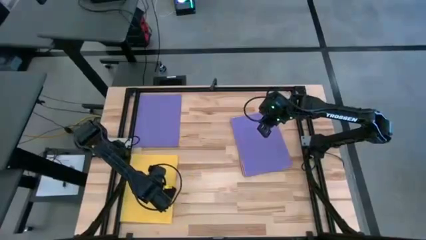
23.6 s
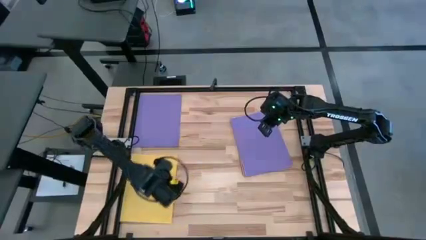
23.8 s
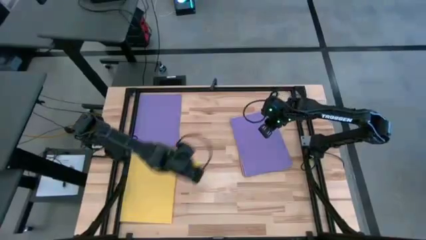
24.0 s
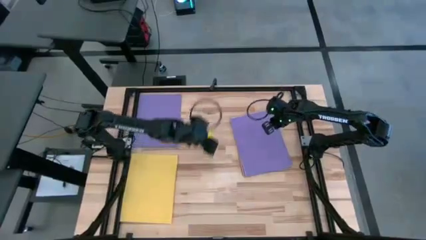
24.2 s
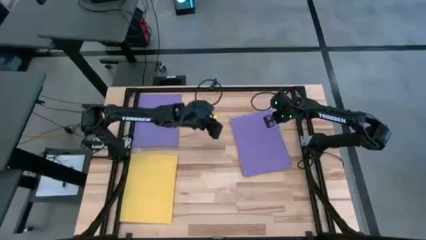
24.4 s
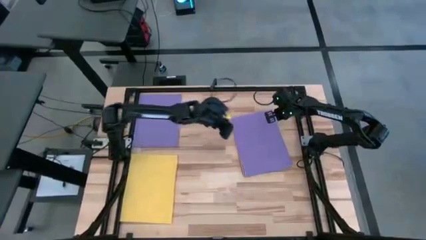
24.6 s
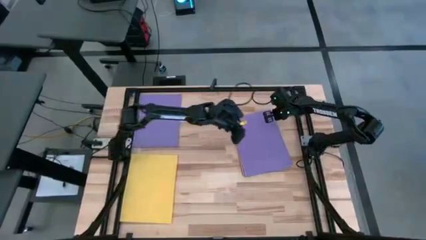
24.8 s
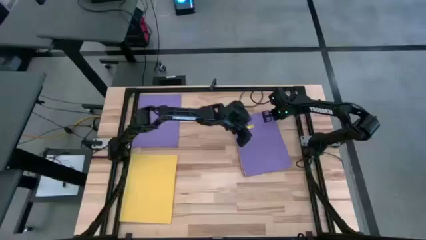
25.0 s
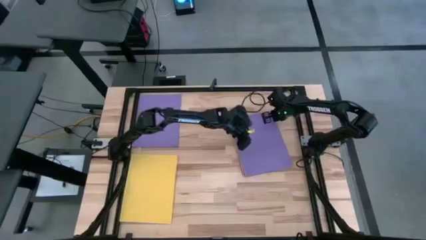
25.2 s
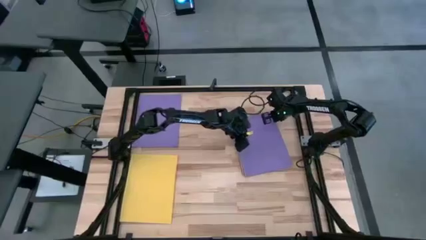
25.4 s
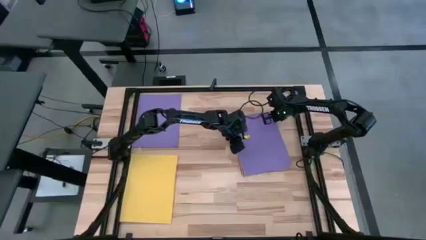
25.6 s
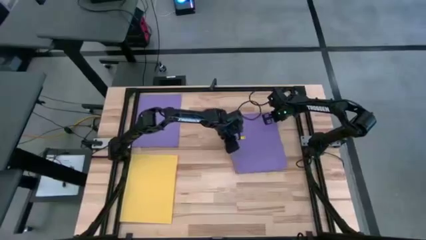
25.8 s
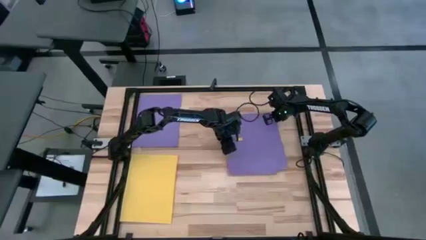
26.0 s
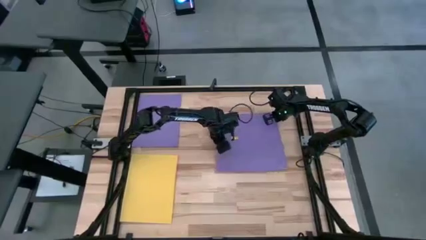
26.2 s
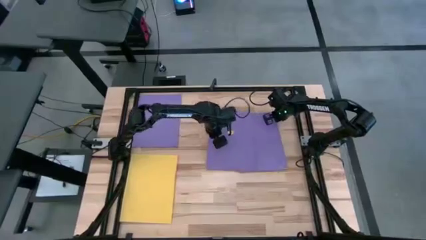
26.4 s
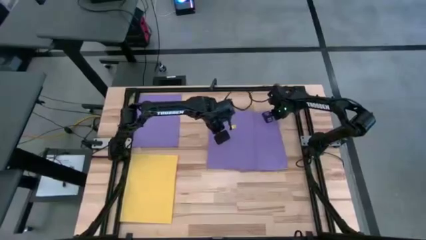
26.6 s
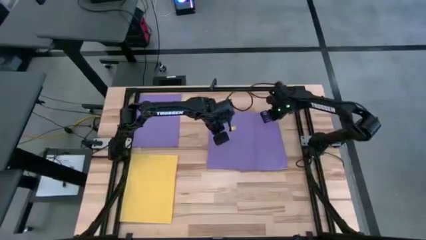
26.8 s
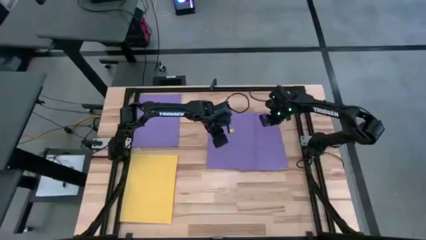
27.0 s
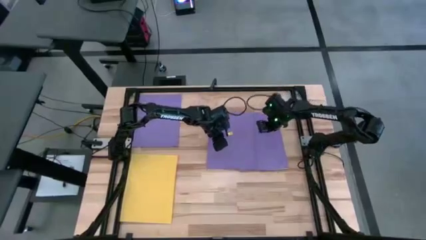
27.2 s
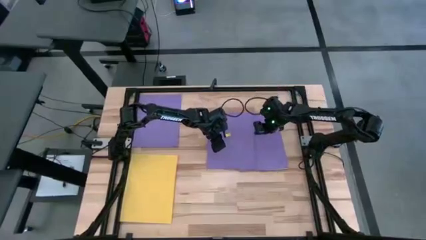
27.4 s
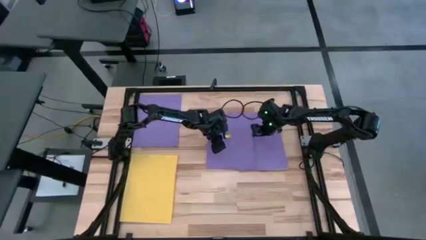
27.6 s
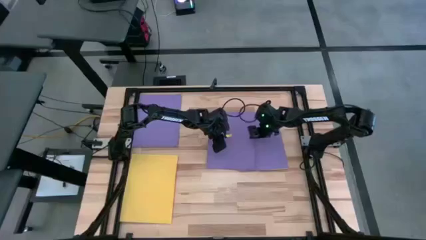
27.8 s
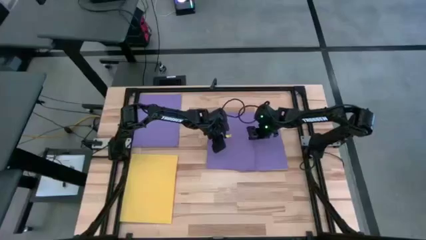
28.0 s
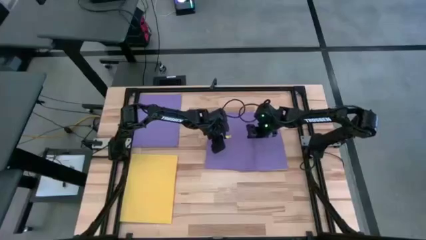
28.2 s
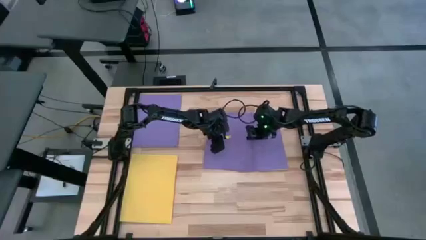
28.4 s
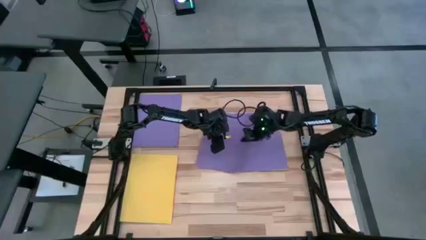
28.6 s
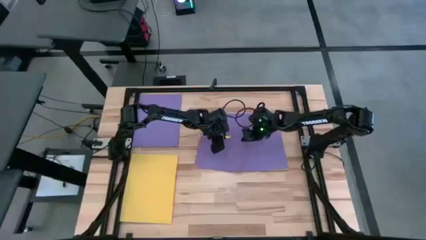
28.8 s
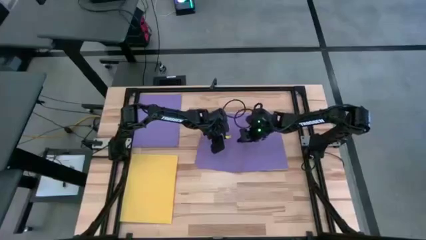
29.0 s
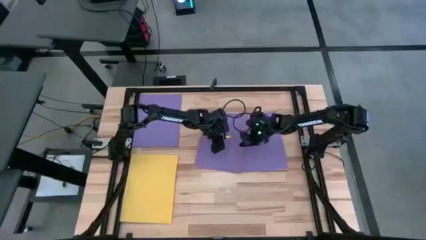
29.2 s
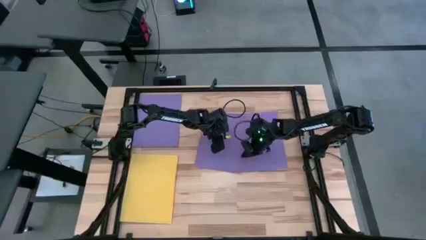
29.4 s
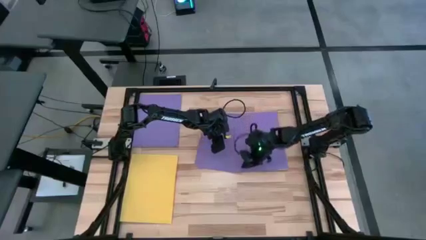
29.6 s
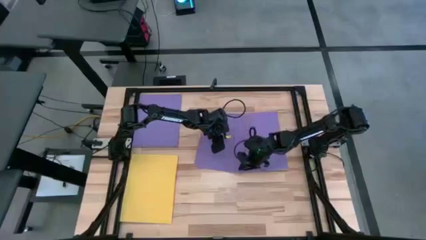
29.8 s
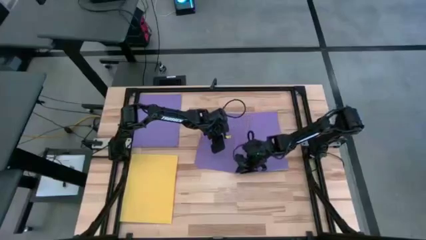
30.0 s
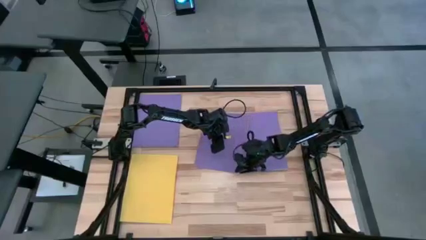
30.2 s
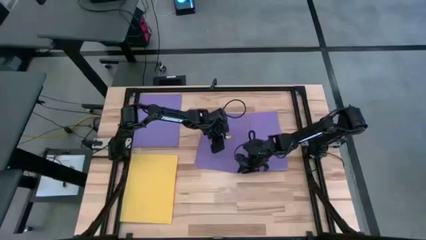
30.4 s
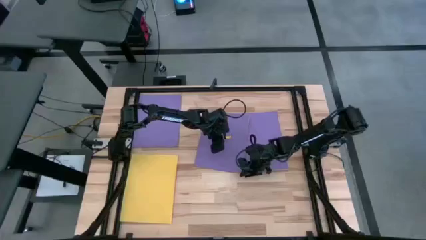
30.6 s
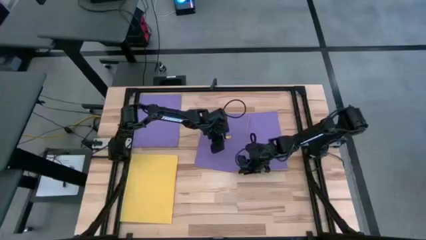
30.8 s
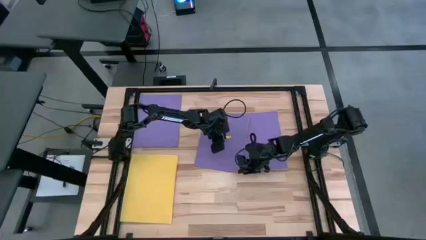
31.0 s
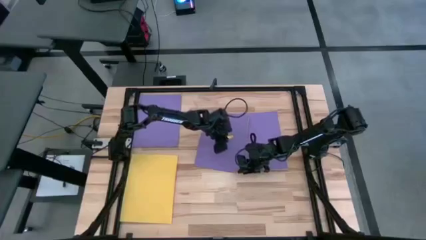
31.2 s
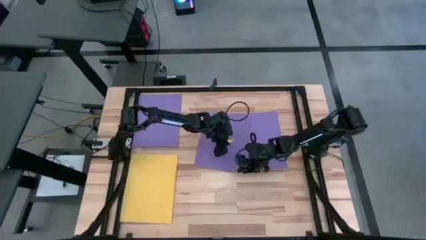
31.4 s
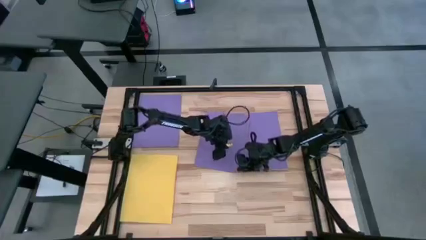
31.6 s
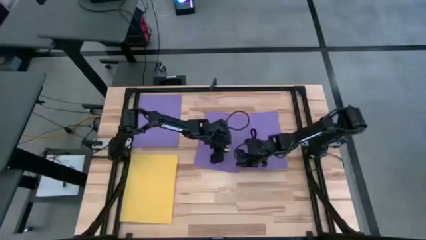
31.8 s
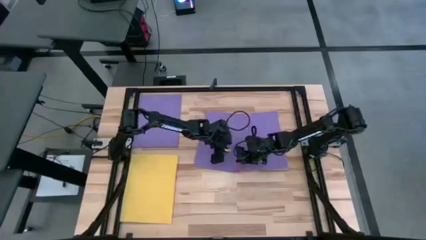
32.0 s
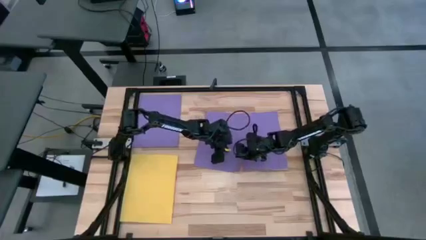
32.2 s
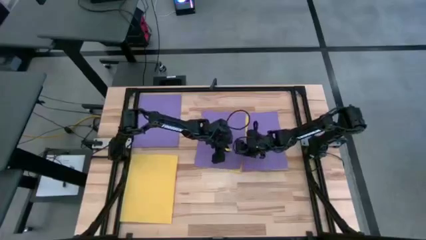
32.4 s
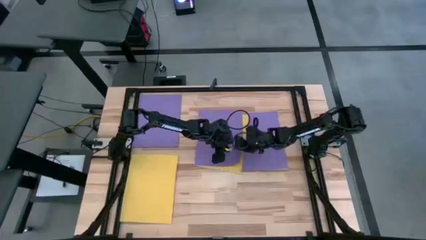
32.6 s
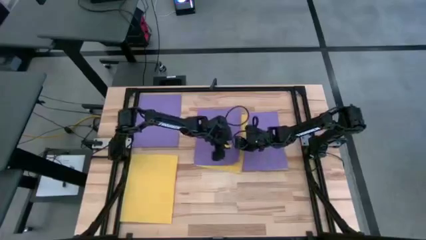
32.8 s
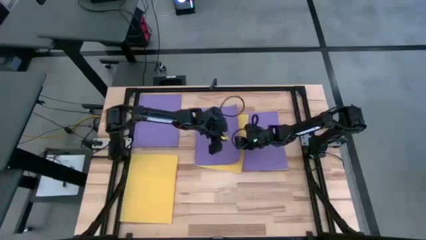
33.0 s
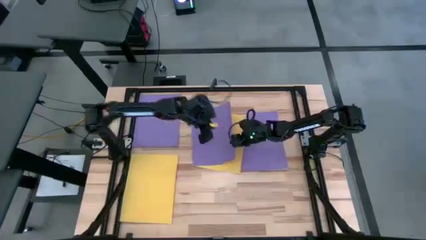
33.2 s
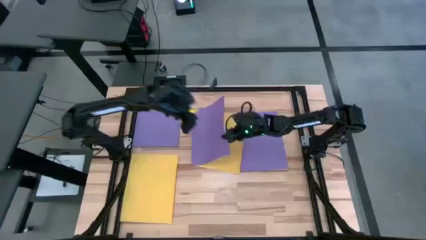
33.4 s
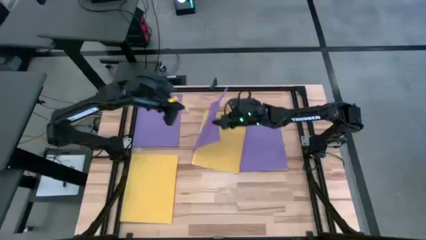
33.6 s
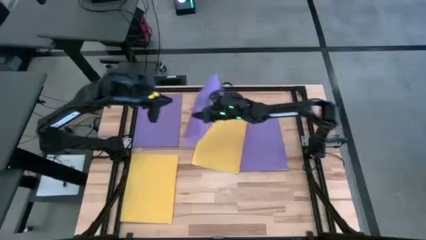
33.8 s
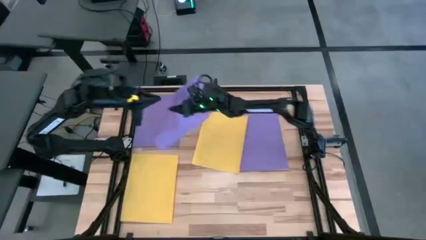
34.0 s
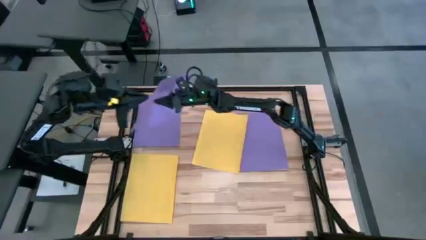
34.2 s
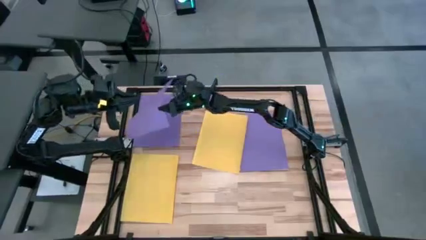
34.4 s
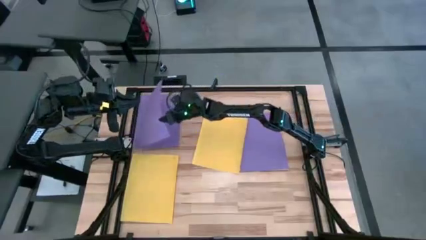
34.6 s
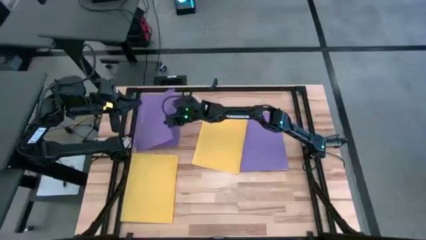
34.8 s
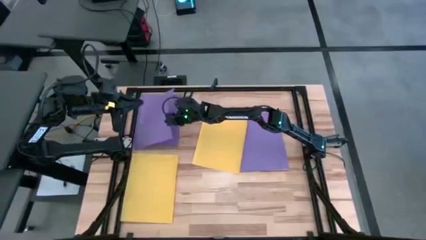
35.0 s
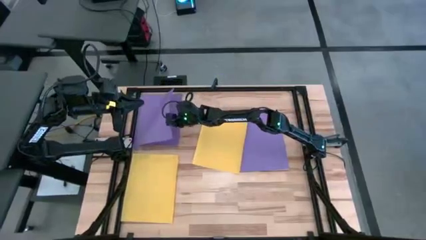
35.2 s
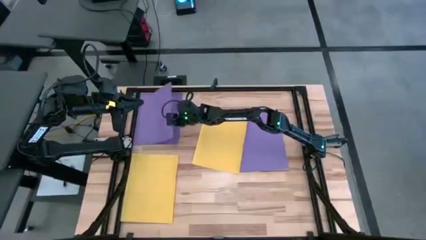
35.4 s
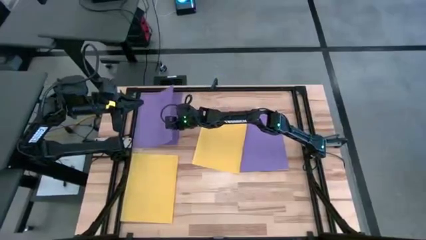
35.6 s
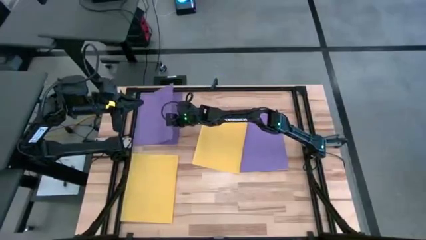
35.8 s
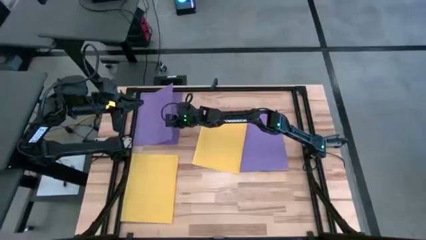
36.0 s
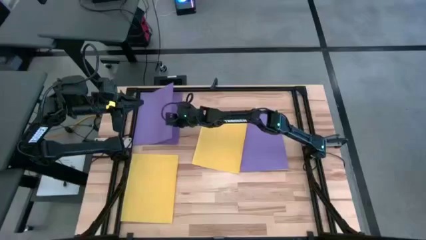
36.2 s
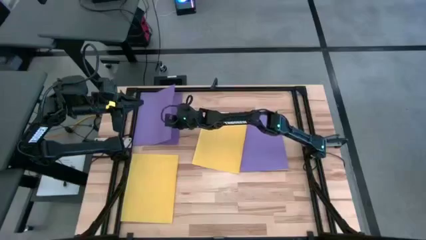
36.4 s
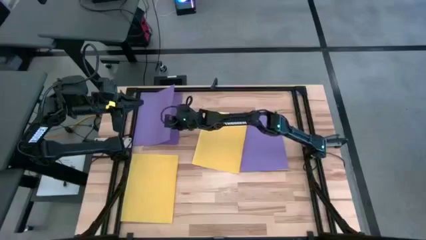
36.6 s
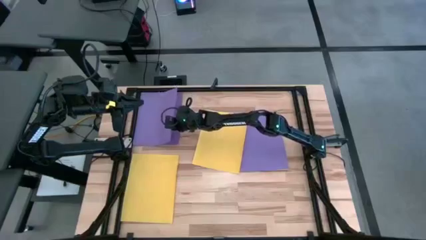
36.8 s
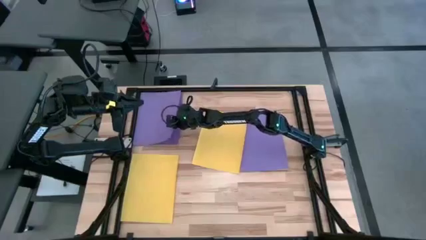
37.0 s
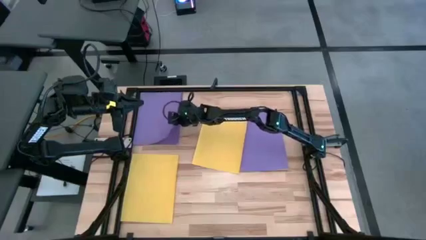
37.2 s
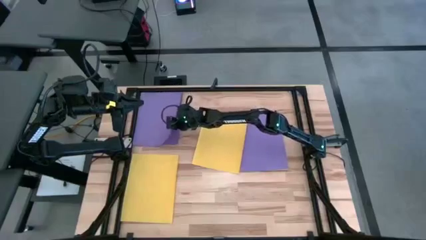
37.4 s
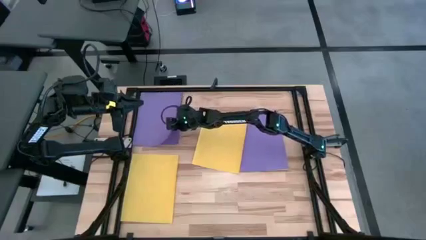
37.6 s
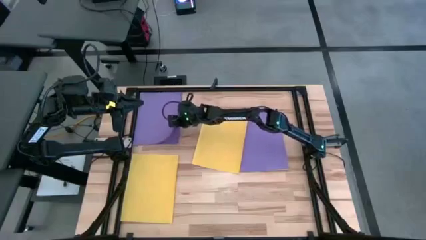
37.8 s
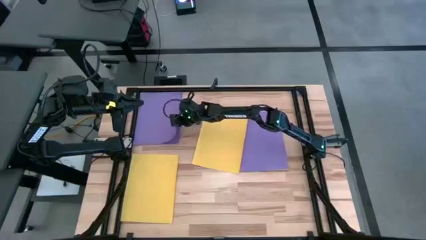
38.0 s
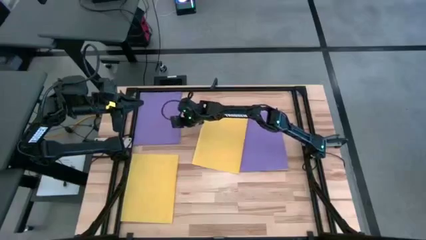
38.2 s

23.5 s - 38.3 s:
Task: Organize paper
Stack the purple paper on top of the other purple paper

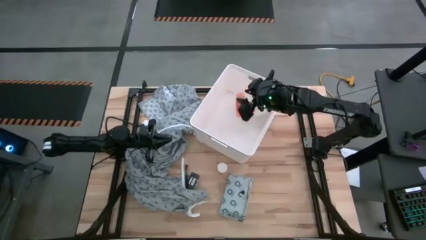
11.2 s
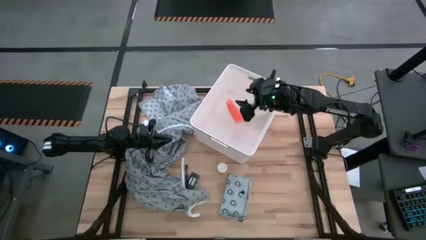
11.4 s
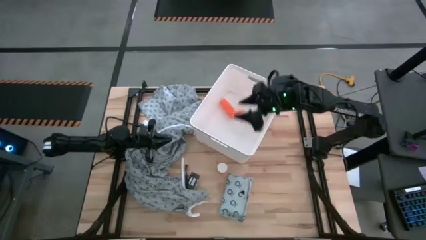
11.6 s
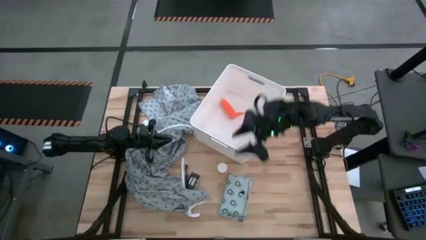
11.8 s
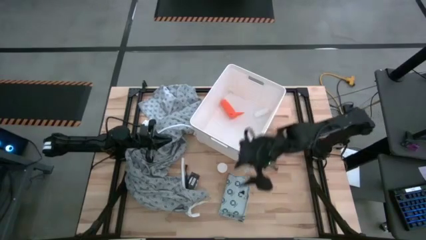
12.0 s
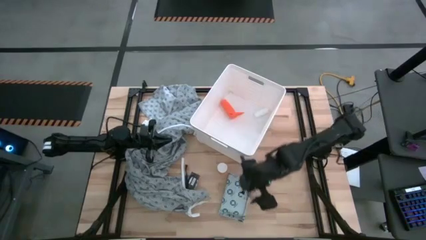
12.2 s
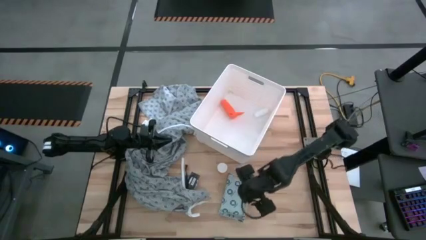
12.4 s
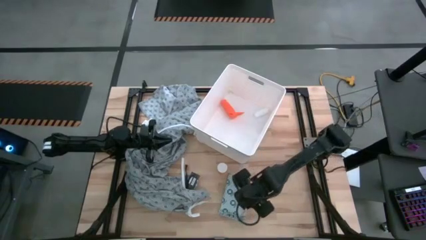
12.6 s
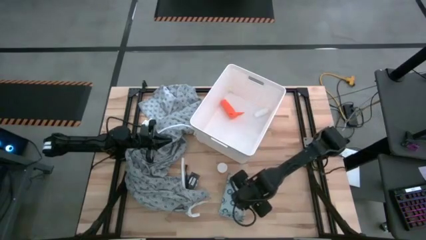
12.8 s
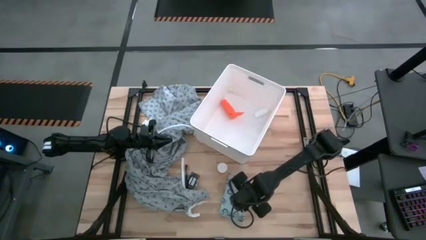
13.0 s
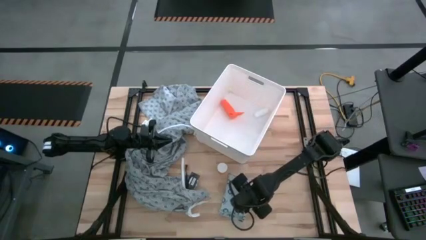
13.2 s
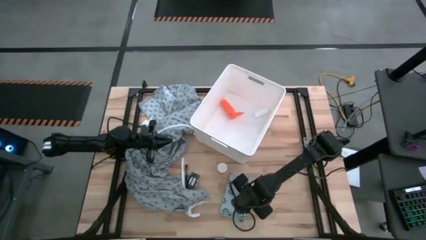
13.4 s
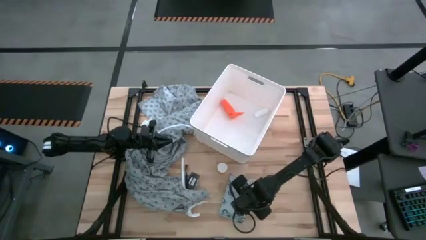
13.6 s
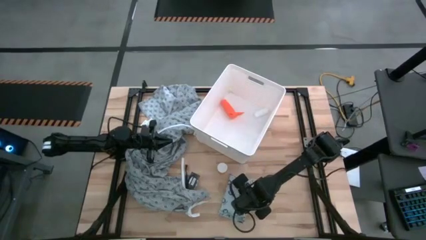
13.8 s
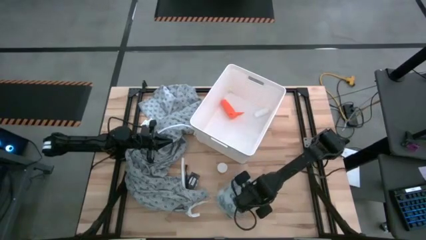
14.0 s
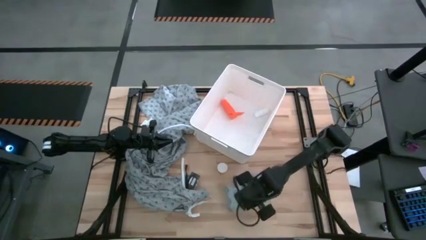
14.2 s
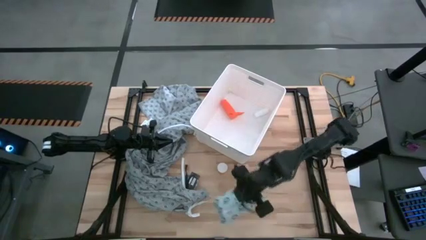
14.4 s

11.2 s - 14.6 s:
Task: Pick & place medical supplies in basket/bin
Put the mailer bag into the white bin
